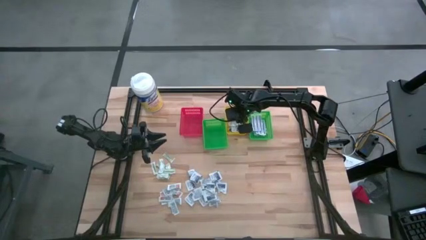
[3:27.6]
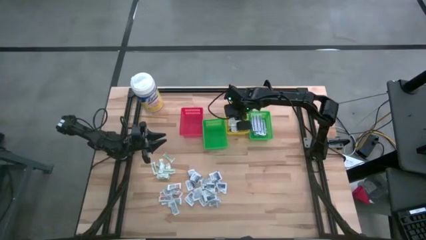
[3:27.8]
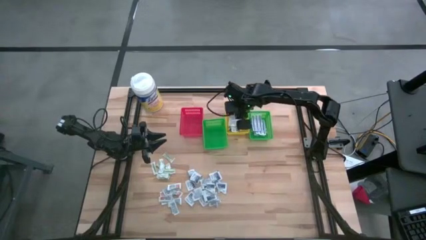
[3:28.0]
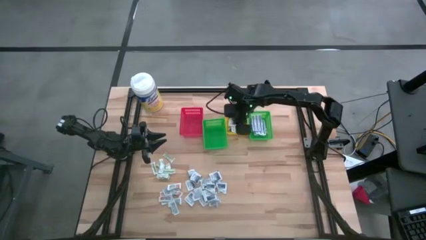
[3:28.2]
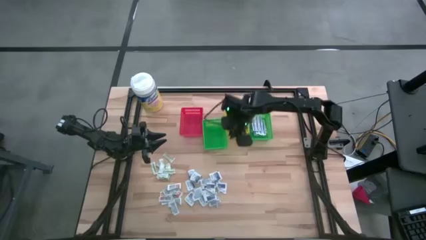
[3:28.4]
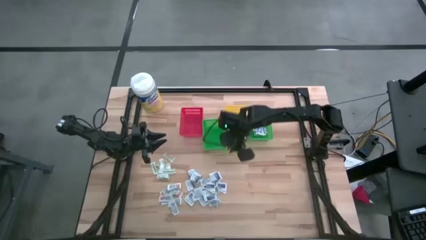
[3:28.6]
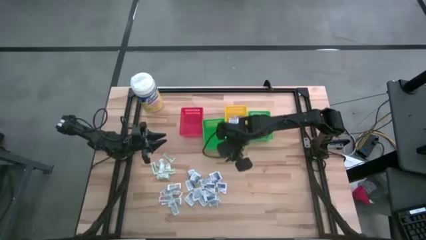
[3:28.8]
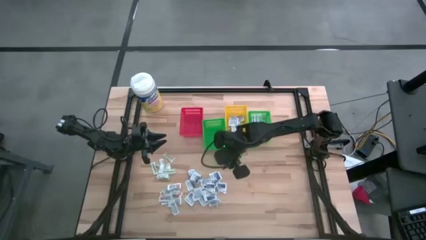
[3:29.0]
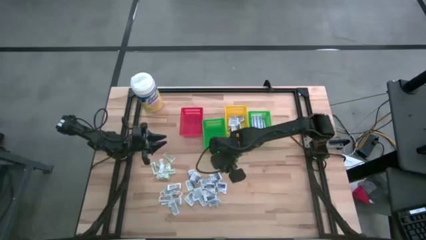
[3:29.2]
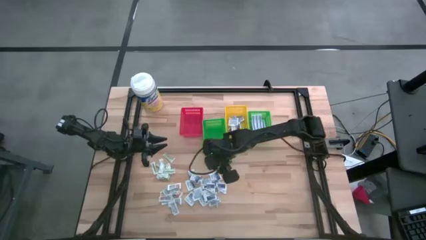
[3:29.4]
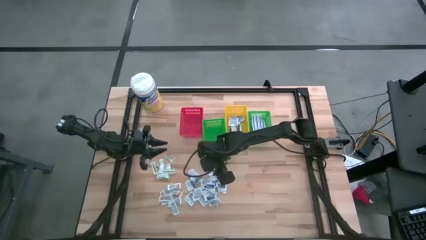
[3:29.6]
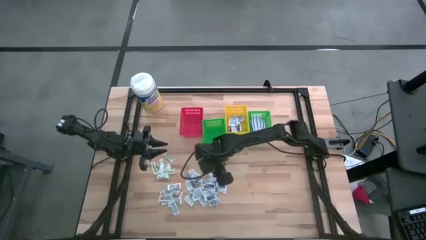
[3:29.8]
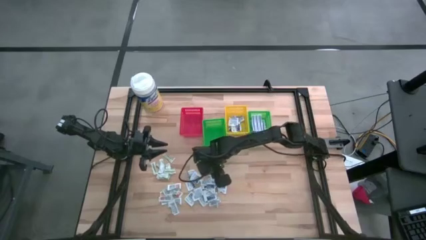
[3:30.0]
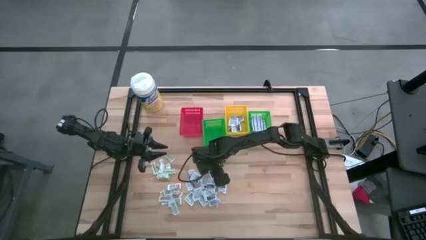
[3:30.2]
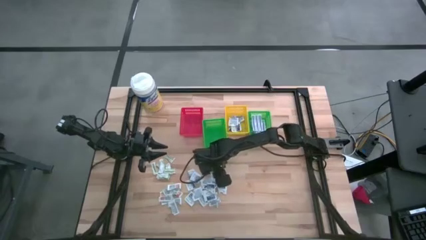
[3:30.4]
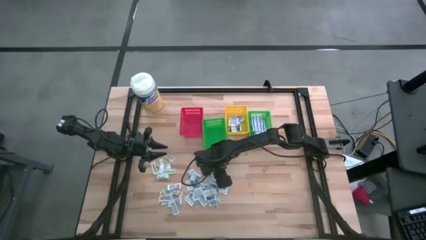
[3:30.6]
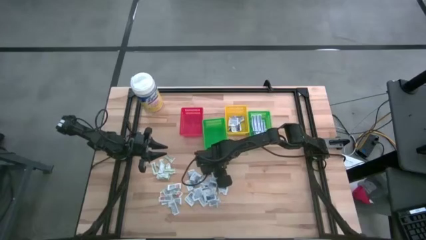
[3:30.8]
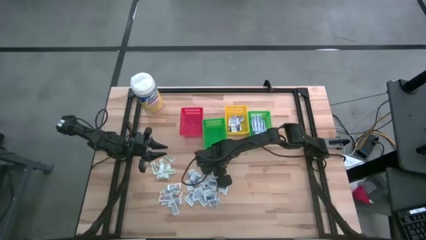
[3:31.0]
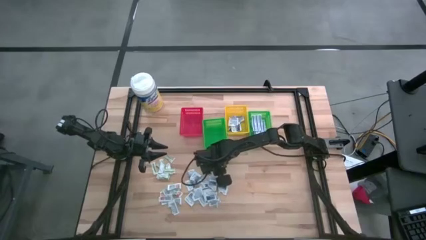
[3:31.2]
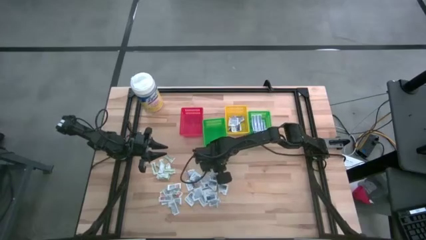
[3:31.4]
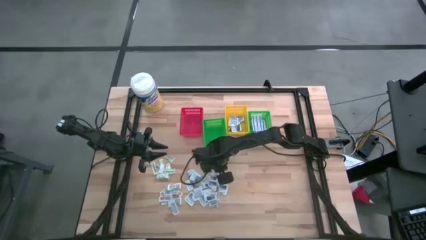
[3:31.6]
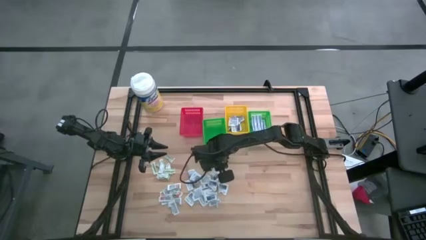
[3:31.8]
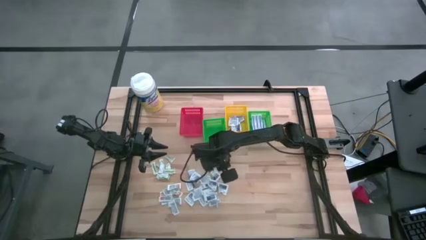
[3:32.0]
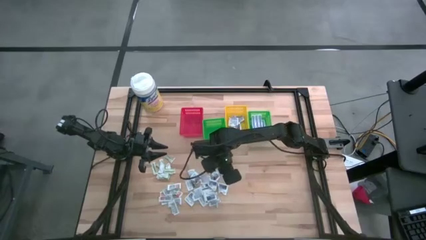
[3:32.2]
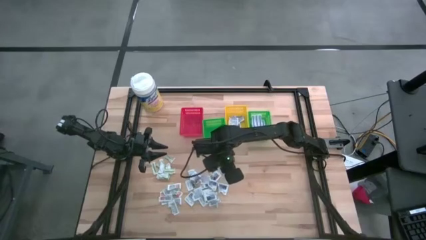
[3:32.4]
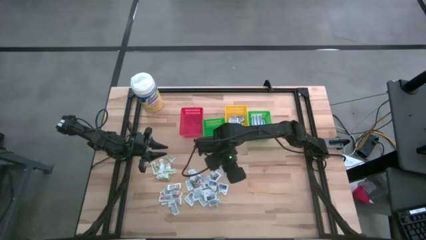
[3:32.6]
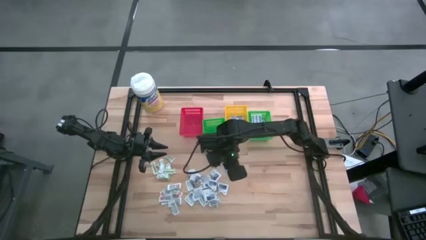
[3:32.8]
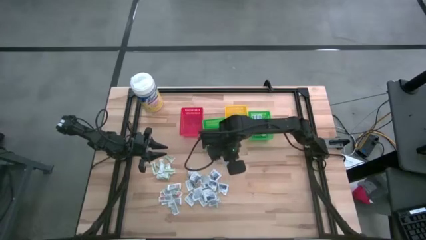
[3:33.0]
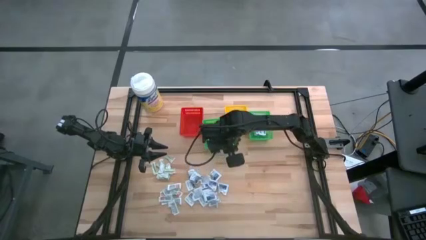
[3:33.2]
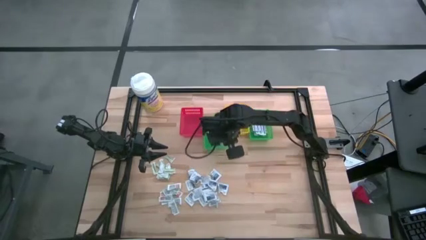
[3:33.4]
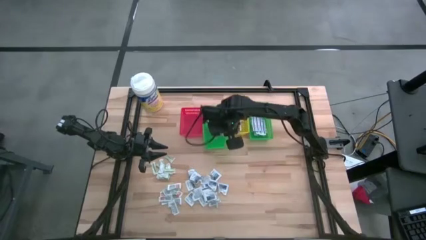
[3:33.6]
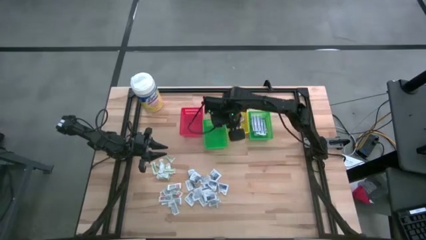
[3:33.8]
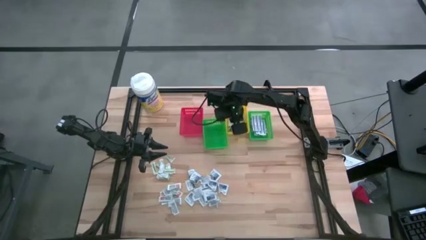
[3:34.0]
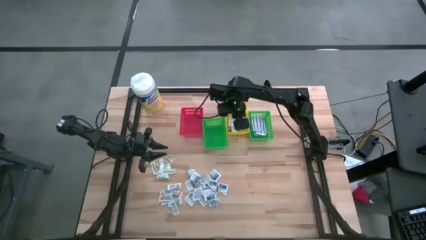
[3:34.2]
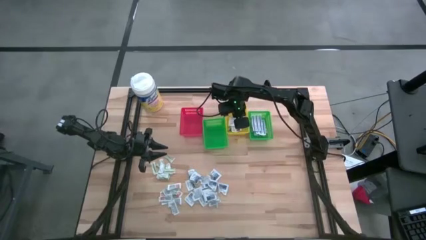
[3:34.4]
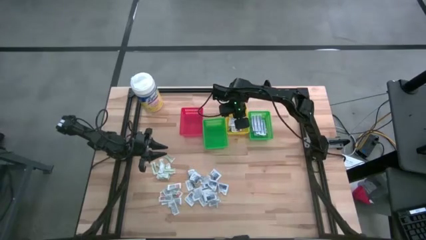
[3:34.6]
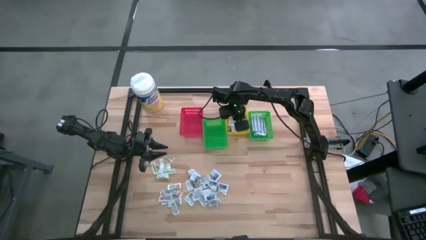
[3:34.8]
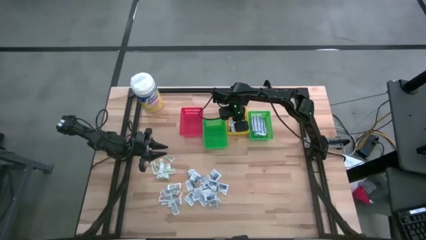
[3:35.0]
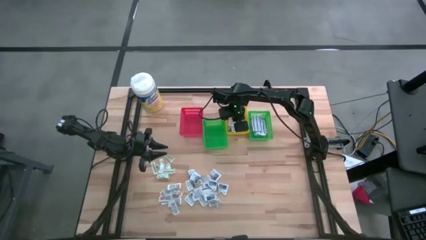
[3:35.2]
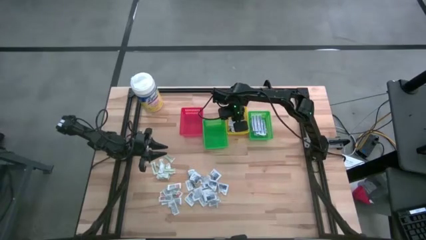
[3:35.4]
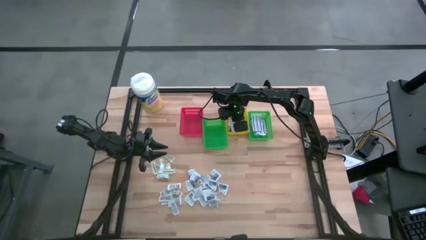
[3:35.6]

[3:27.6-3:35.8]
Task: Pick & Place First Aid Supplies
Put the alcohol pad into the yellow basket

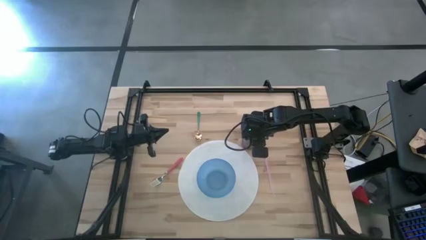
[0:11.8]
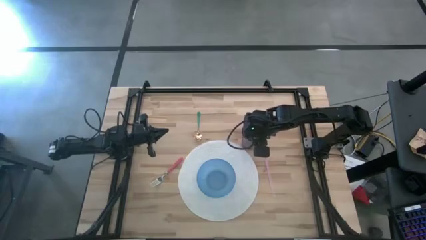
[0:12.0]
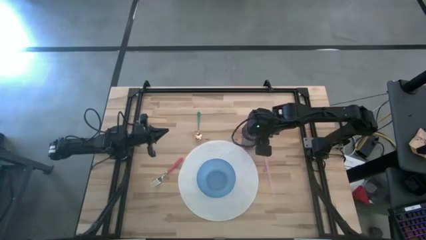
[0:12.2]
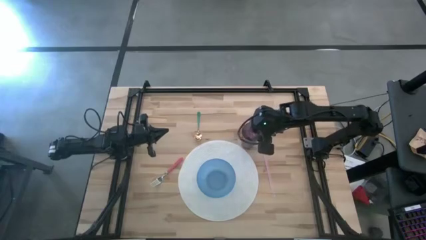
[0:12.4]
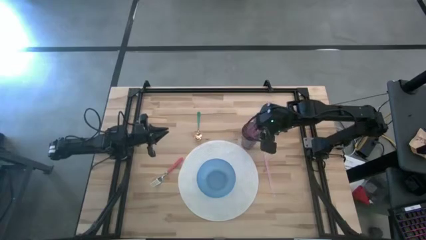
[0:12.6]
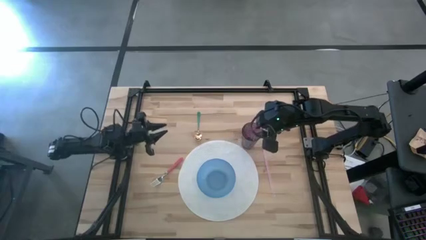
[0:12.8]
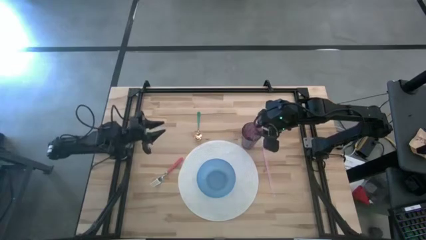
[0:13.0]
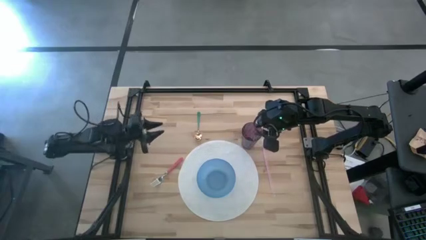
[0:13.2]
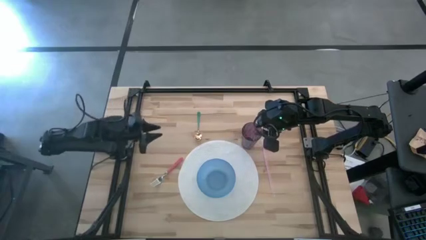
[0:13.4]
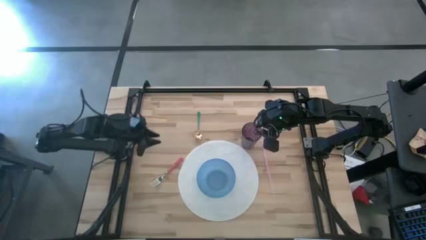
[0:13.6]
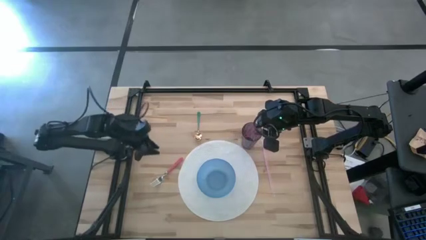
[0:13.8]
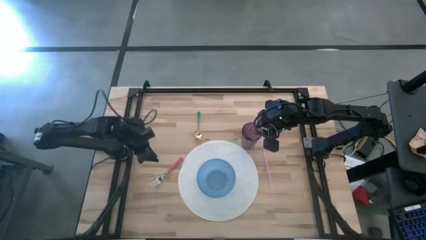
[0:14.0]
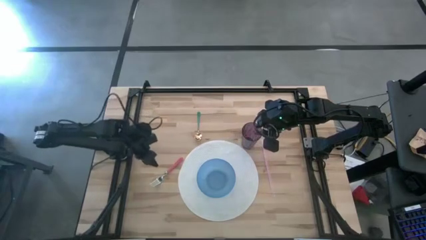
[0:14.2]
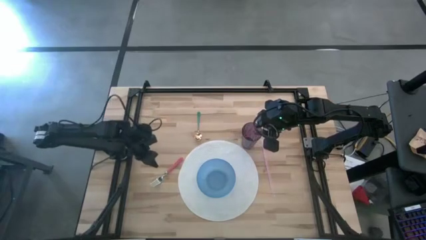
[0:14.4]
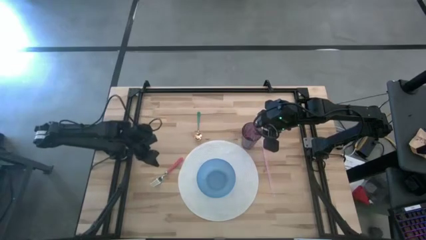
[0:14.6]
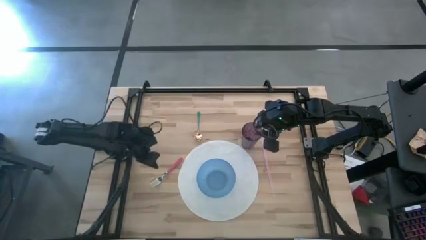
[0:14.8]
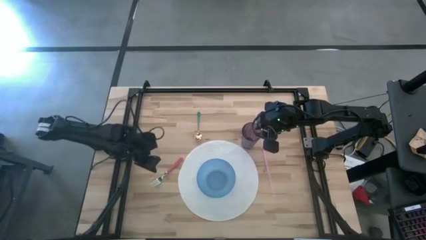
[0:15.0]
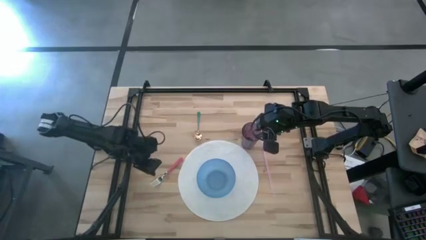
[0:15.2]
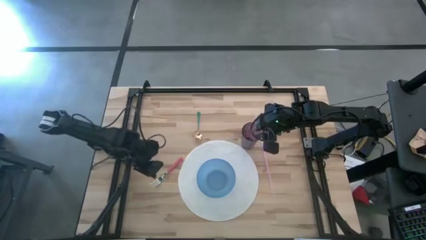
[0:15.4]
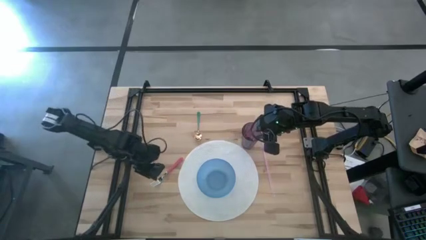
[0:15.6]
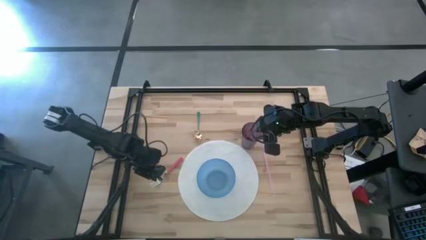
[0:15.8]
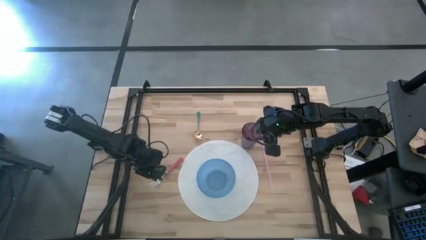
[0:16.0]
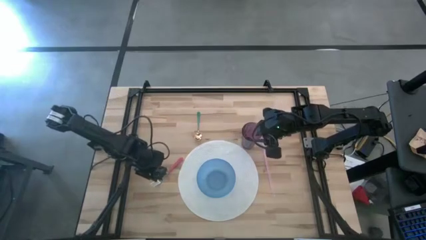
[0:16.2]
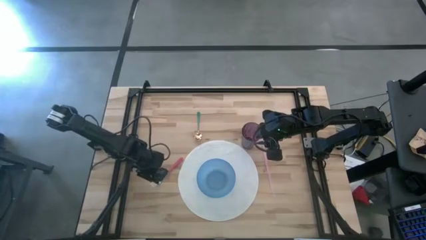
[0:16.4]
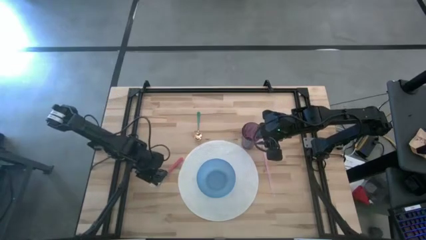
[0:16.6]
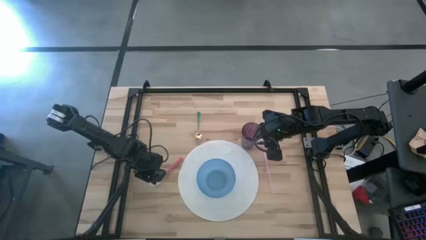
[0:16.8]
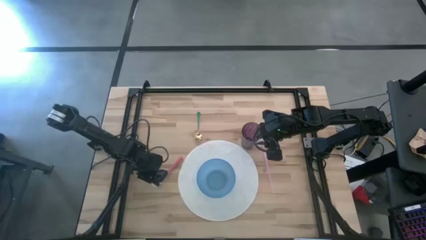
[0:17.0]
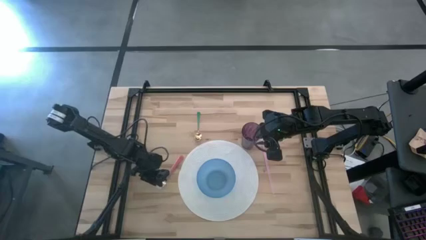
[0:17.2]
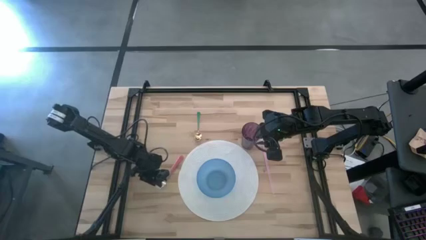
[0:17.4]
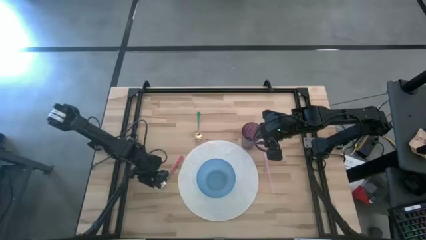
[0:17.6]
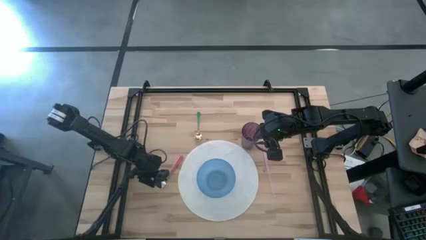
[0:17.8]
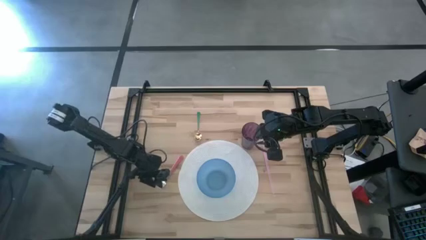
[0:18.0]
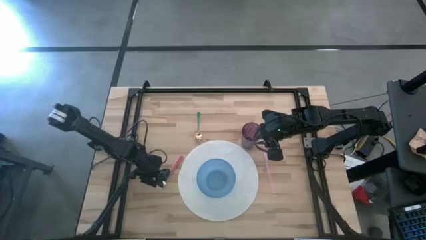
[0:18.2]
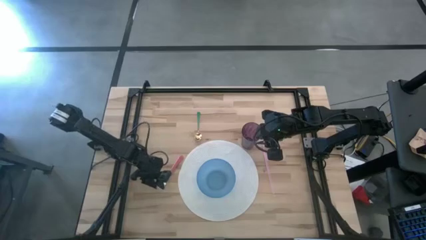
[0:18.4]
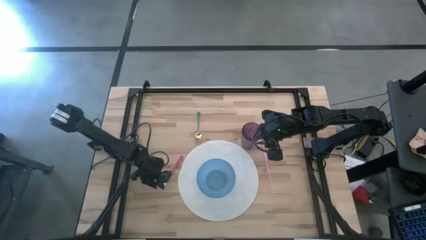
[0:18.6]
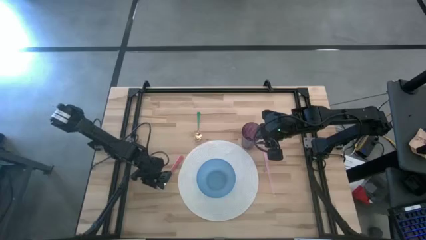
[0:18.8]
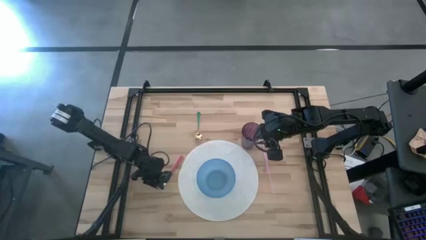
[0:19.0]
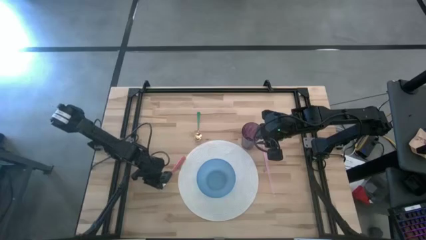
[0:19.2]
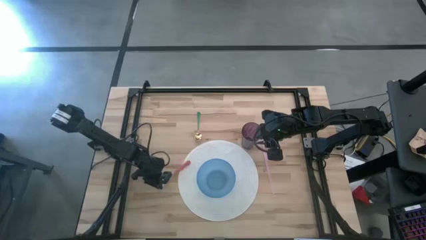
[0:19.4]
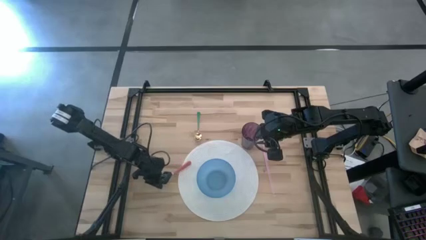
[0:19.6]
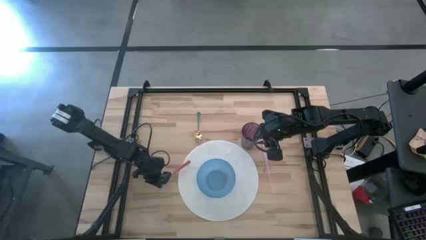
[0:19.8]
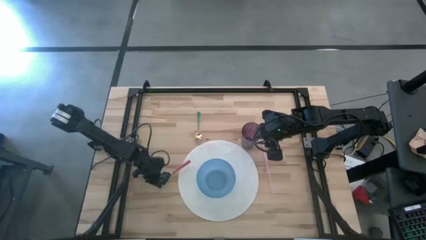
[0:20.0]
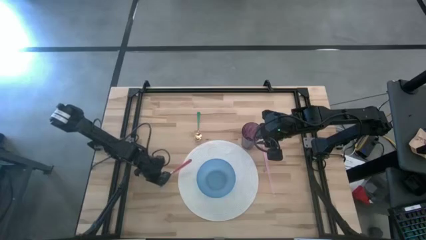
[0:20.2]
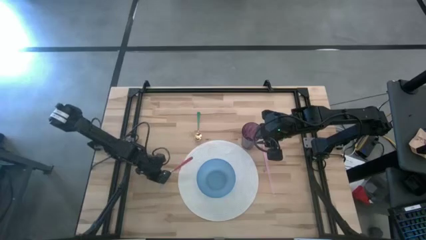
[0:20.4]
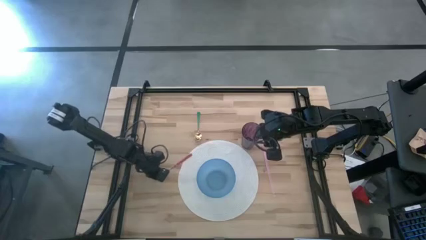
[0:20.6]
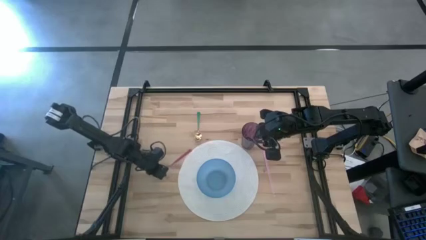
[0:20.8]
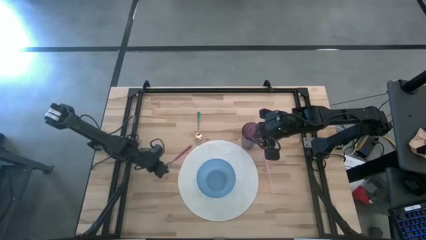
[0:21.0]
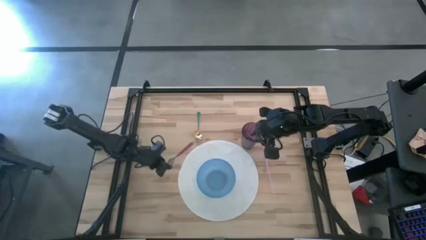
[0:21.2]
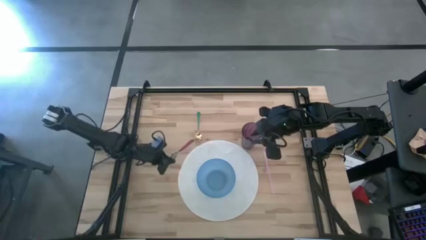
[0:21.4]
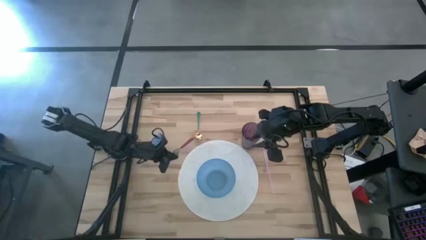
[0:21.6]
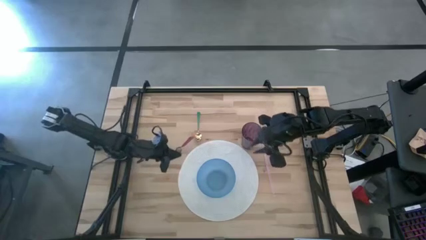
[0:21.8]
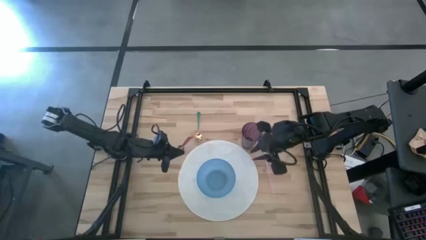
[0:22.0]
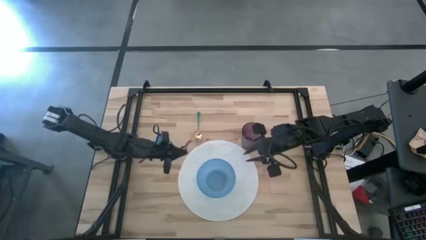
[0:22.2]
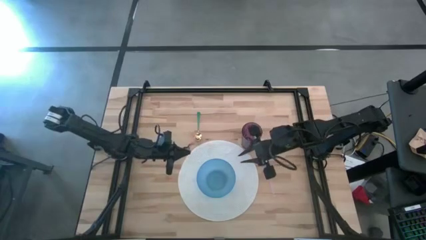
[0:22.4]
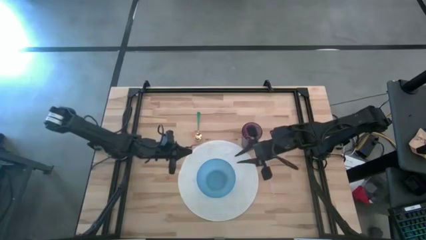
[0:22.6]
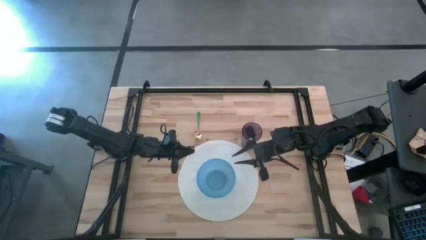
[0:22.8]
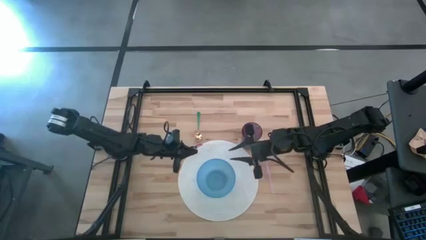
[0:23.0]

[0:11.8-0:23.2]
Task: Pick & Place Utensil
Put the red fork into the blue bowl
